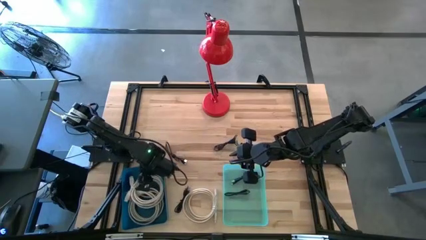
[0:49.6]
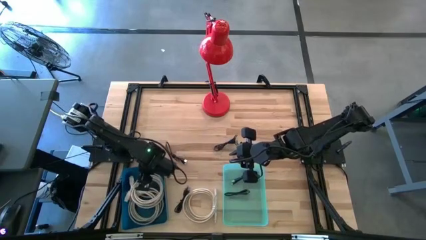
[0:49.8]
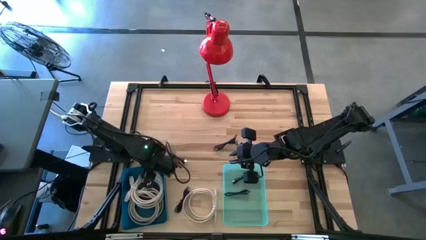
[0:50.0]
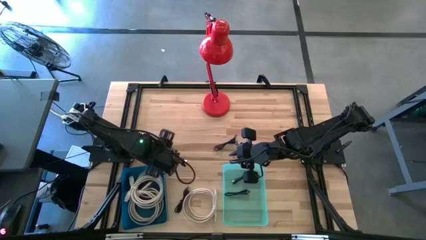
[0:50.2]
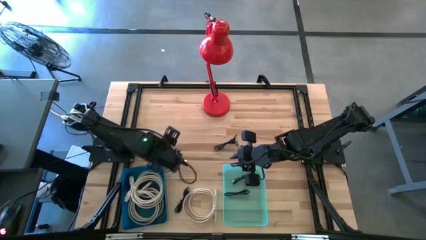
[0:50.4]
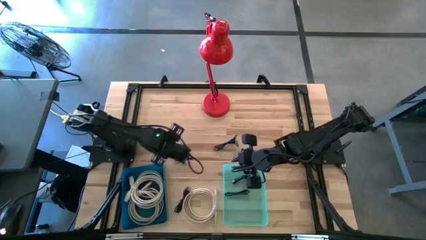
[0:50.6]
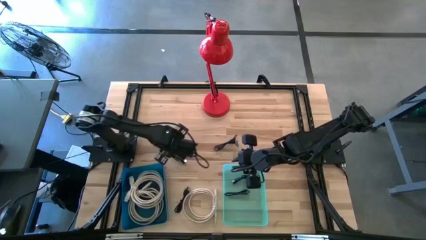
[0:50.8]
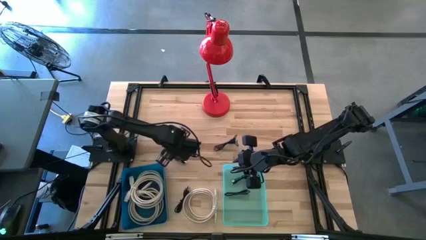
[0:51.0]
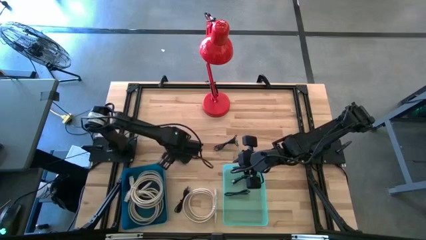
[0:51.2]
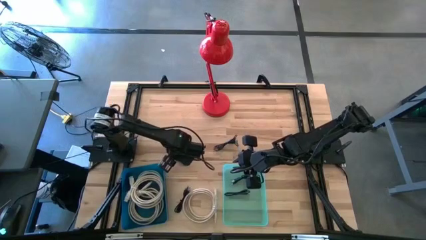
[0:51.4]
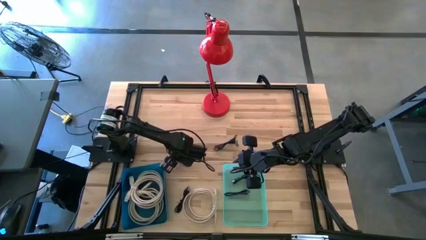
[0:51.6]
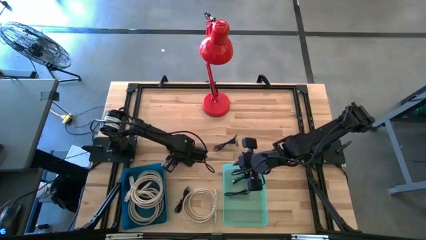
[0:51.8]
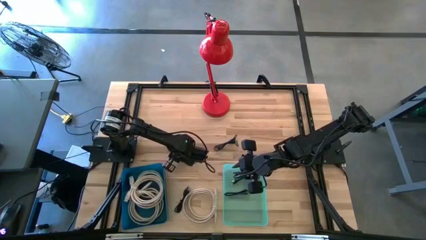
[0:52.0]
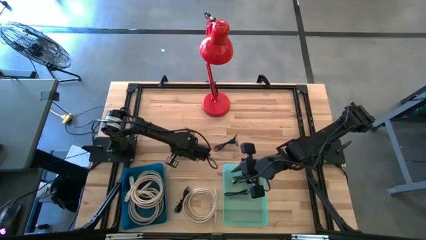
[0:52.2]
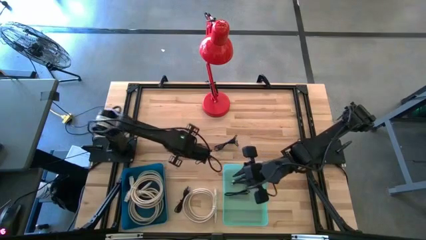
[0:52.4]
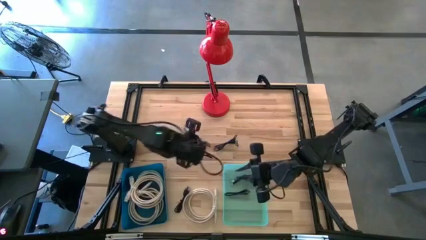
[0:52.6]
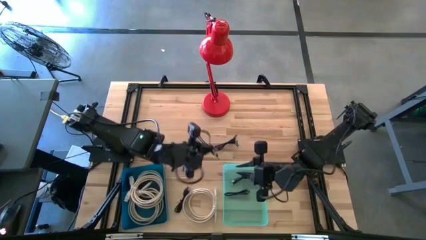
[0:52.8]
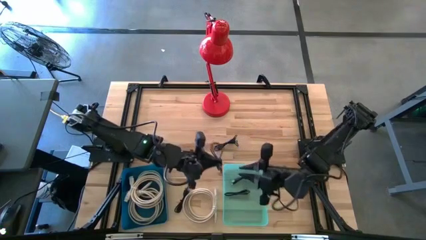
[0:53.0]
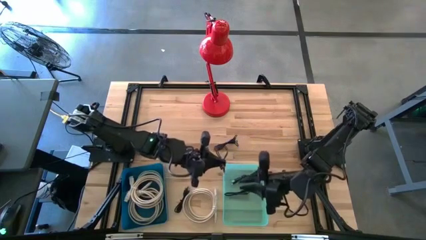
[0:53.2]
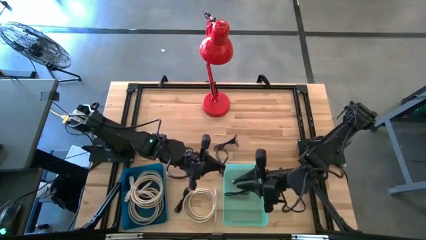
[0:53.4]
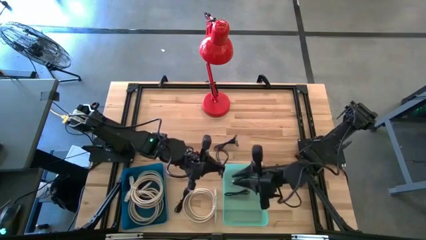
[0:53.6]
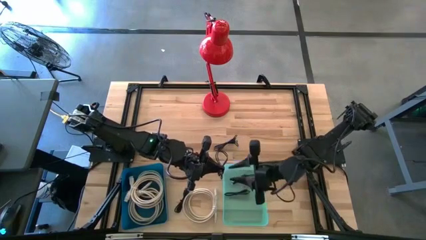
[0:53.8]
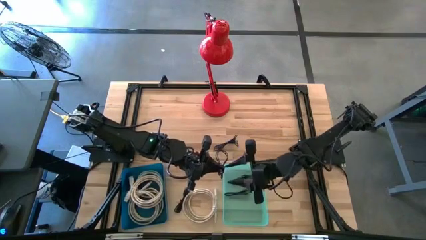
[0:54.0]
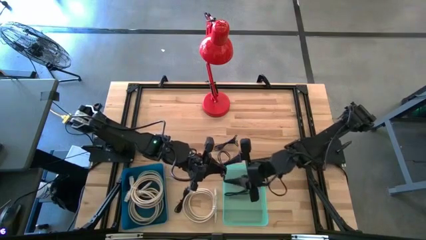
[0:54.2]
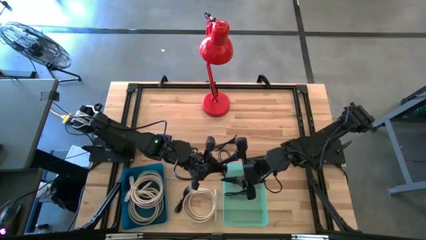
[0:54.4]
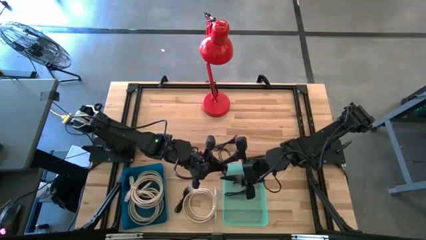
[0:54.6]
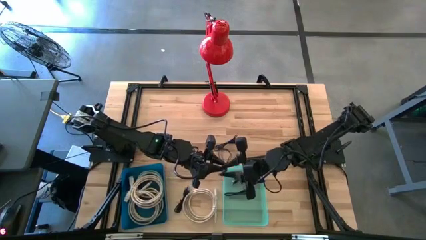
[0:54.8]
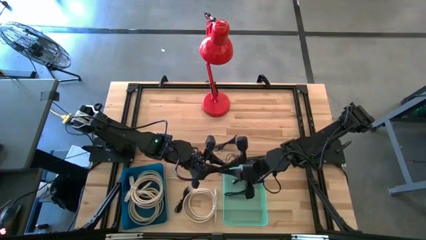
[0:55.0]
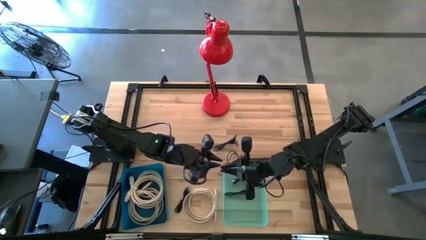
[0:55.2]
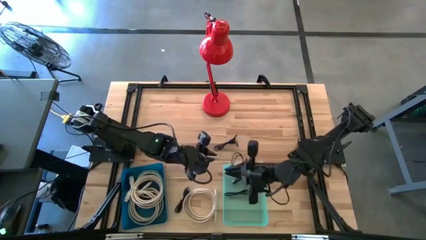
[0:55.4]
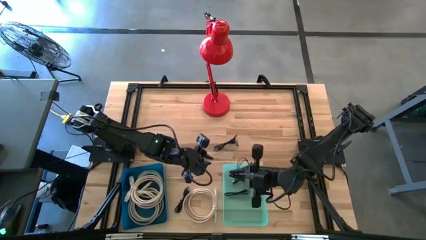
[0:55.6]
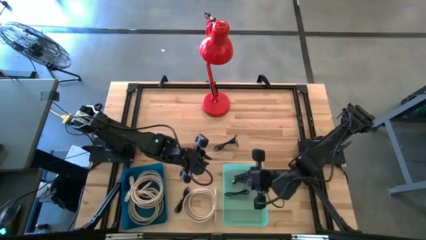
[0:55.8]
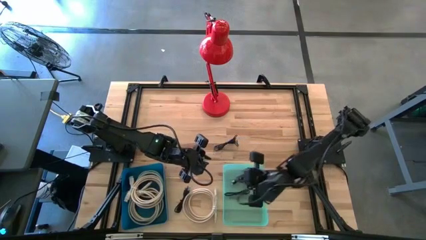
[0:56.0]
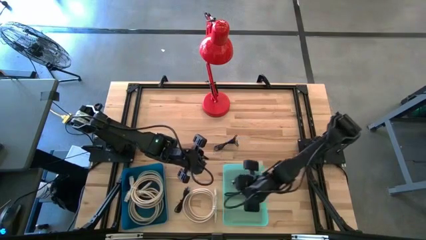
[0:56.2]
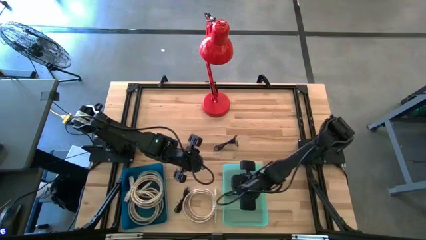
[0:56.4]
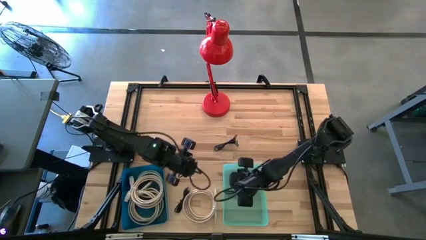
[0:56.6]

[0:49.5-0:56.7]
Task: Pick & Place USB Port
Put the black USB cable into the green bin

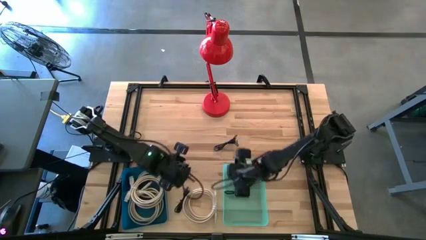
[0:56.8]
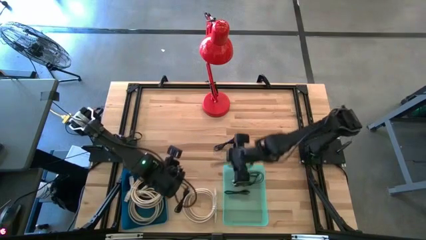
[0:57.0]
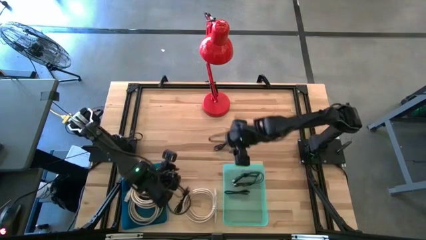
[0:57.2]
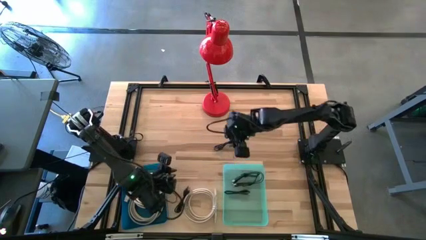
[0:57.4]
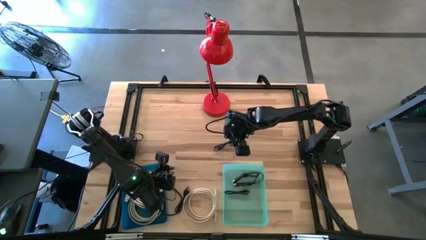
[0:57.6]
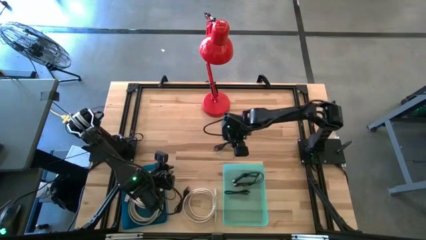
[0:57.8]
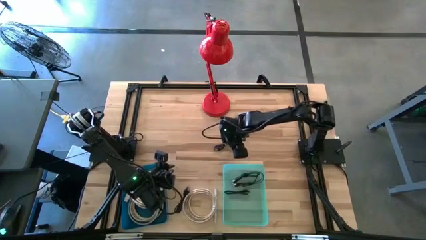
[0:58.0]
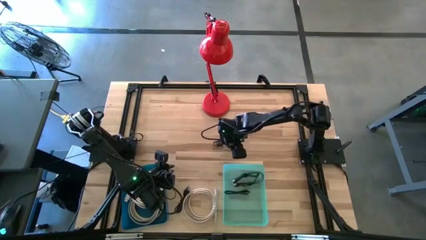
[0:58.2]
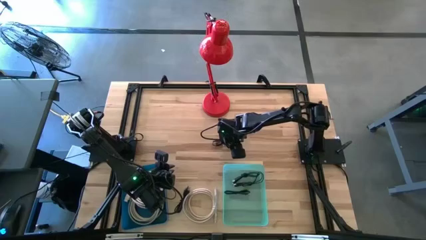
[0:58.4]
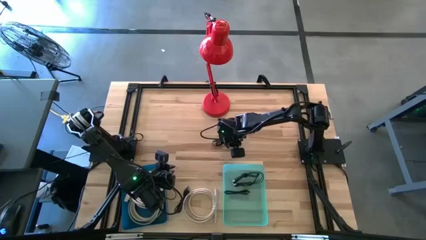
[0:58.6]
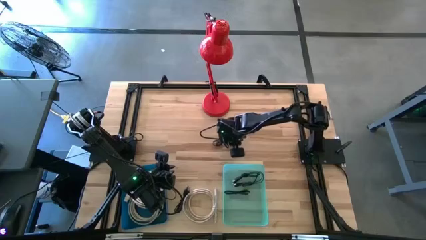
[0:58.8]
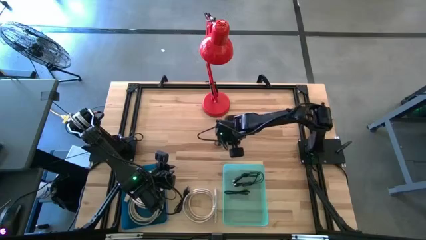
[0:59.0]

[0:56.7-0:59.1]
Put the black USB cable into the green bin

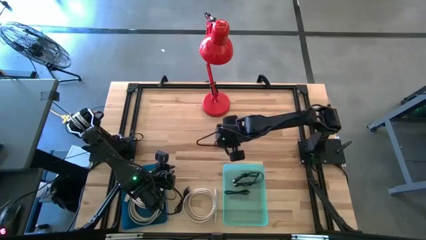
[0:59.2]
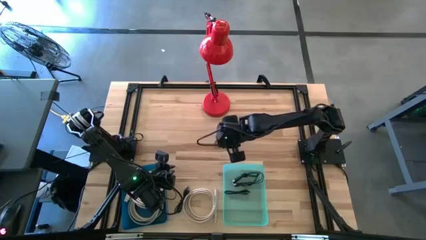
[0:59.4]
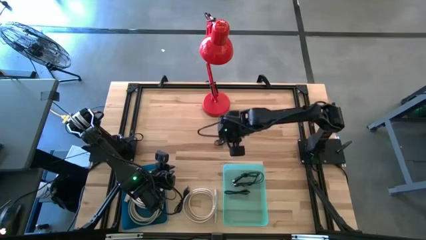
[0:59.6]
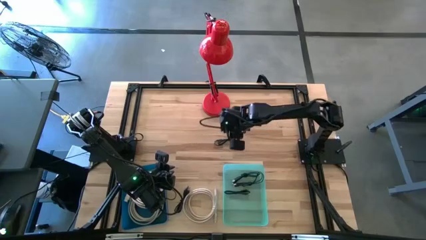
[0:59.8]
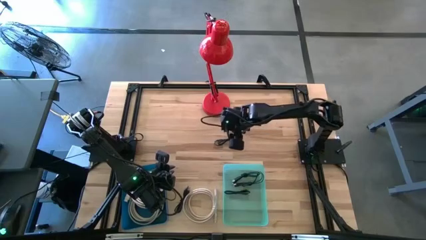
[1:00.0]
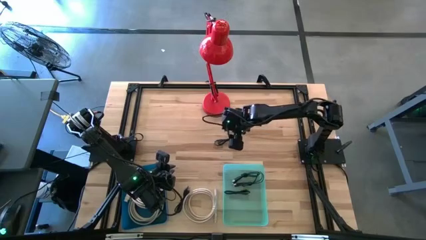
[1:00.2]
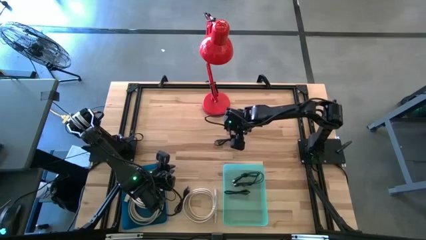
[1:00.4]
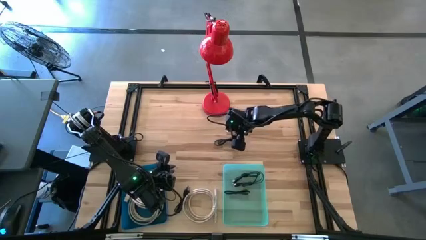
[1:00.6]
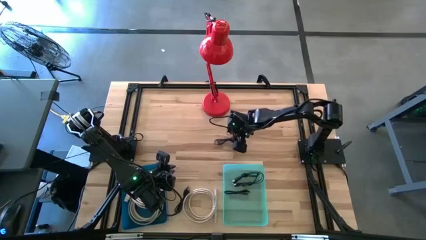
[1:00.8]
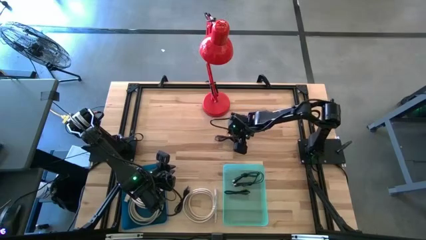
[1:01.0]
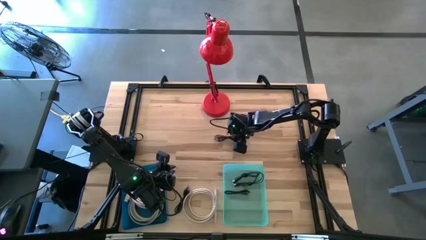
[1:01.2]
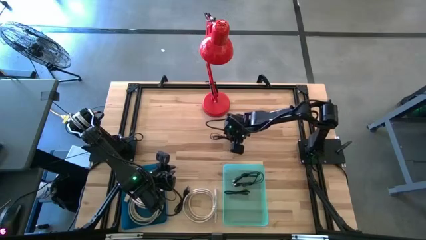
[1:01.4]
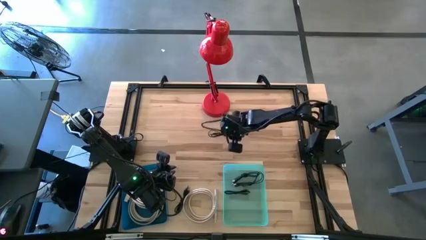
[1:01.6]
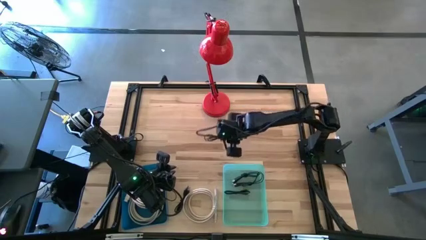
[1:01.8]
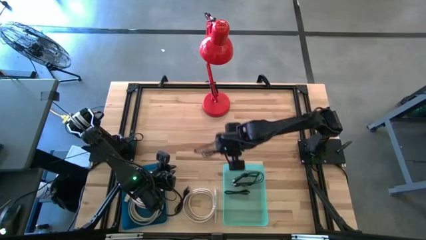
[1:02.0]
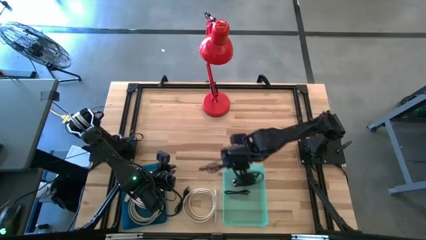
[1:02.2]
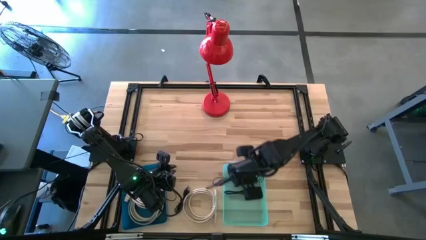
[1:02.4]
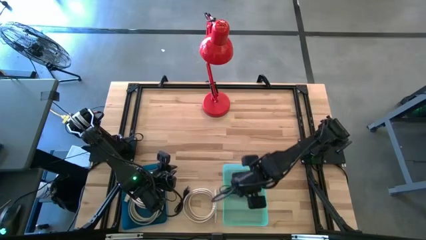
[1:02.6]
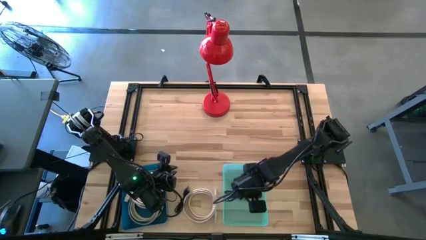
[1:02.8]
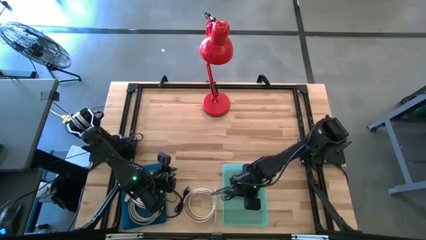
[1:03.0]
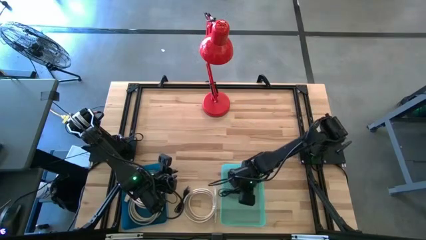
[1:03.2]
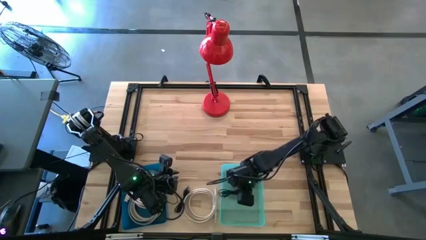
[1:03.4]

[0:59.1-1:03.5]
Put the black USB cable into the green bin

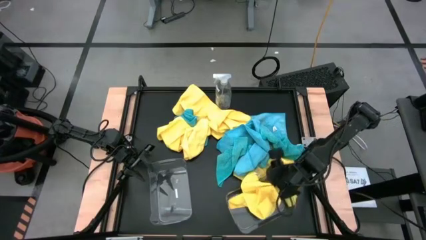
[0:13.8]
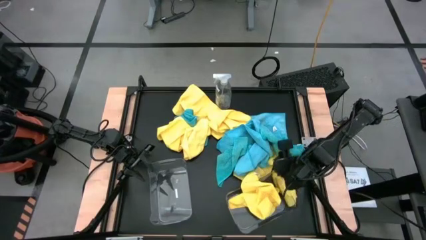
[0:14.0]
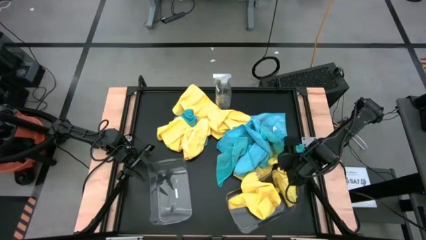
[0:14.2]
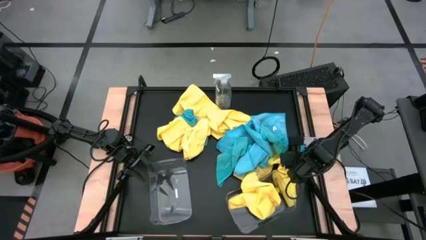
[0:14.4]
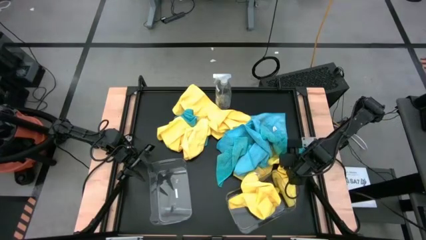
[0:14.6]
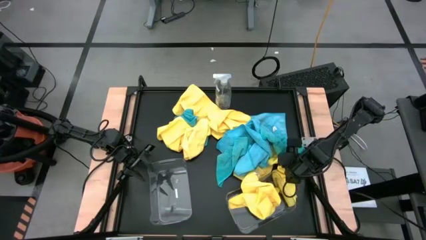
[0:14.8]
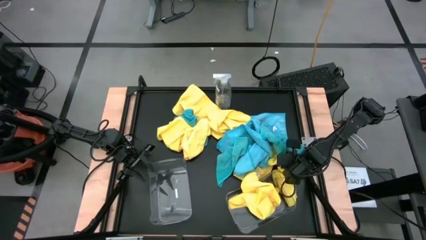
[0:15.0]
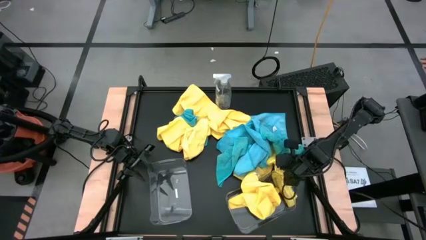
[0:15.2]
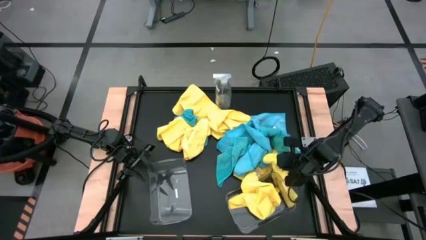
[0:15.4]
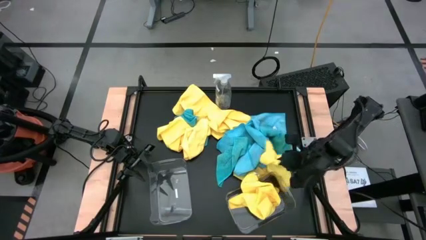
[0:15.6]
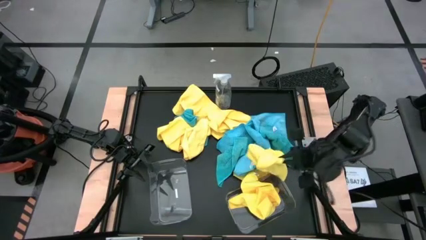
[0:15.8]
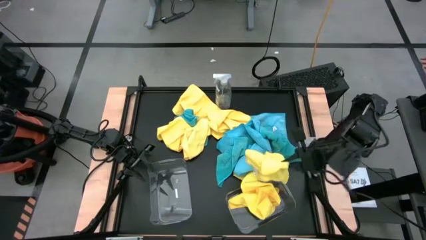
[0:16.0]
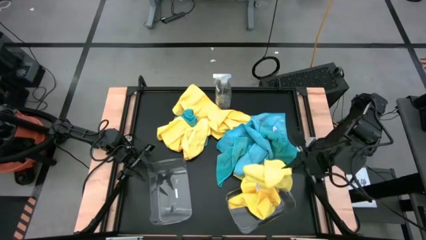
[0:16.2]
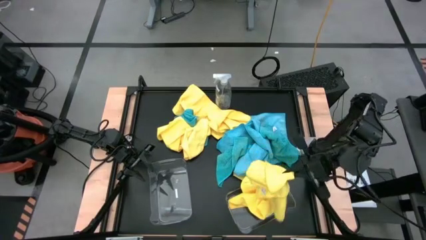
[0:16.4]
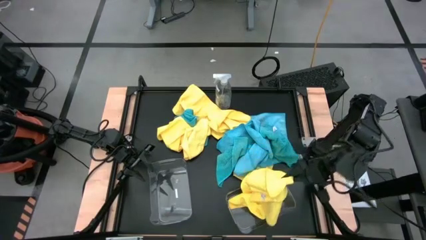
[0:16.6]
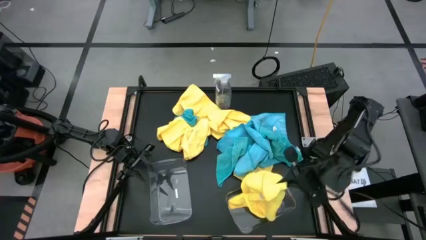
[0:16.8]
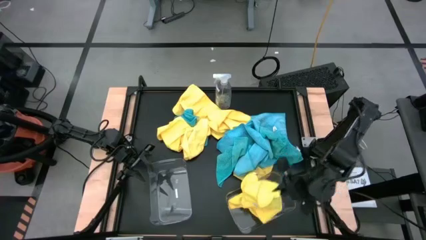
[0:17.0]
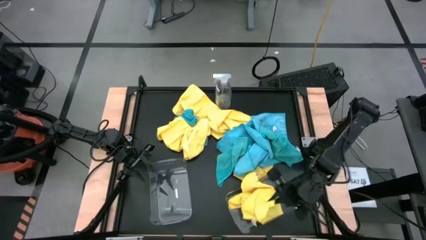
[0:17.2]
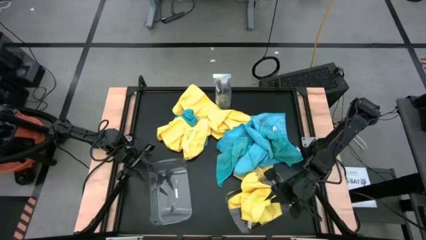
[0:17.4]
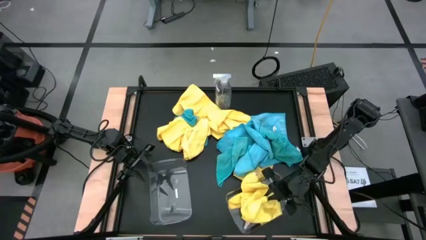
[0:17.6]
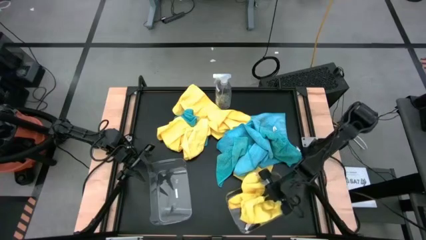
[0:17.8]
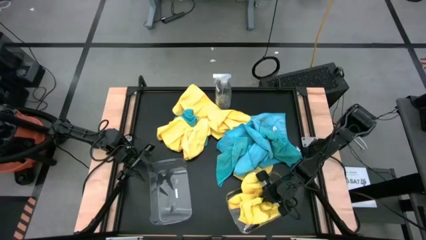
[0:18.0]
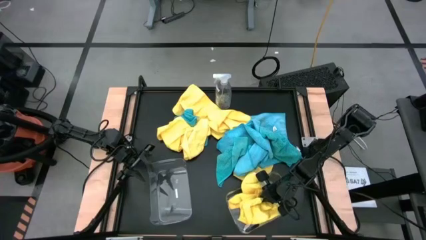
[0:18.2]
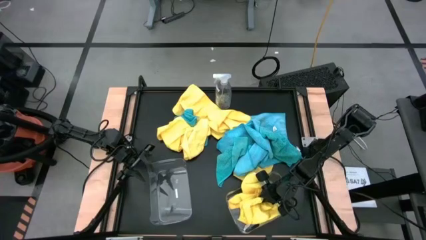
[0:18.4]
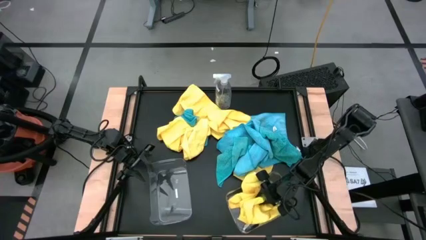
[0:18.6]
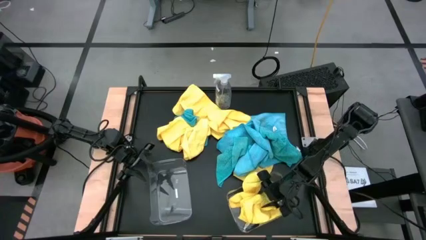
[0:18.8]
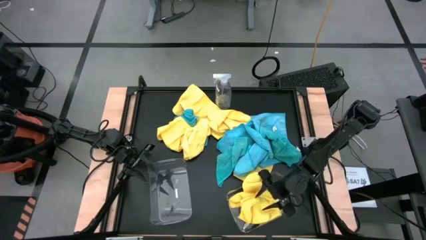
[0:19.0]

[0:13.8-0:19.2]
Task: Sort microfiber towel by color & place in baskets
Put the yellow microfiber towel into the right transparent bin
